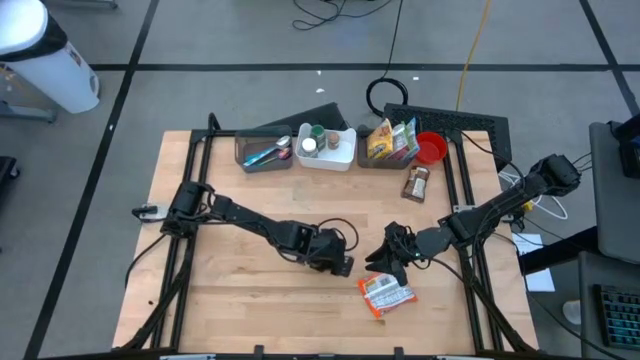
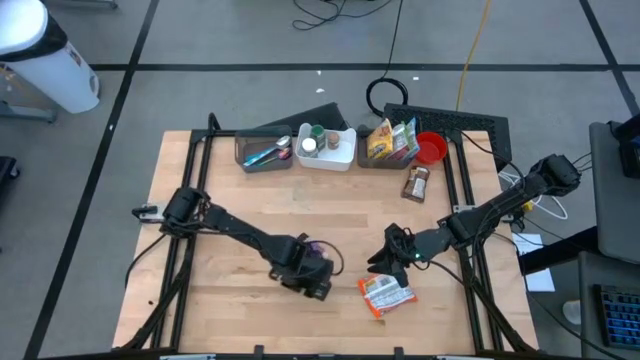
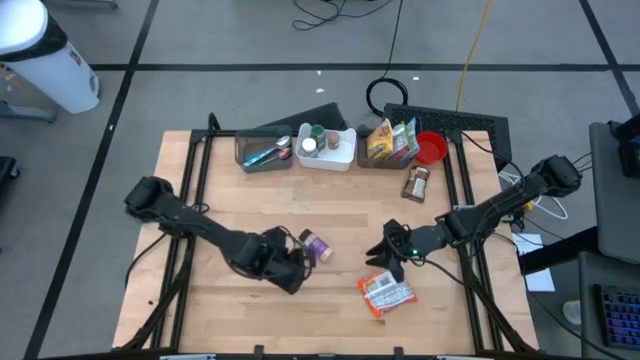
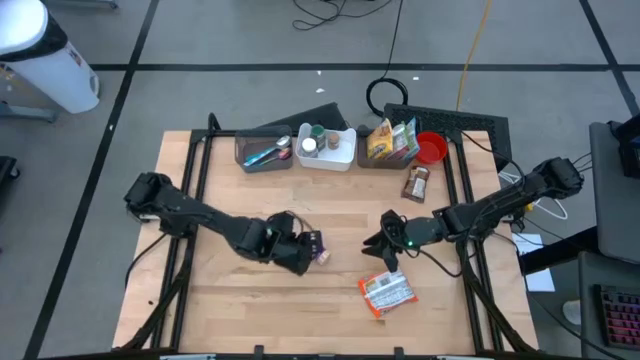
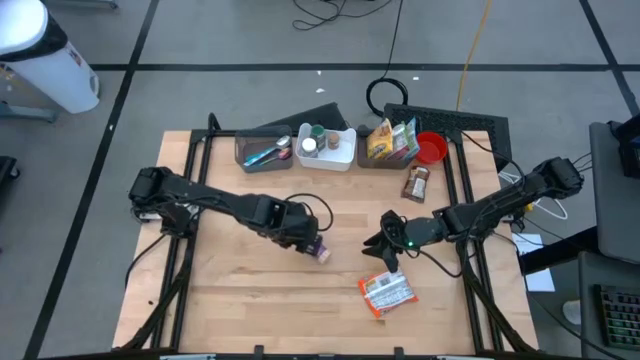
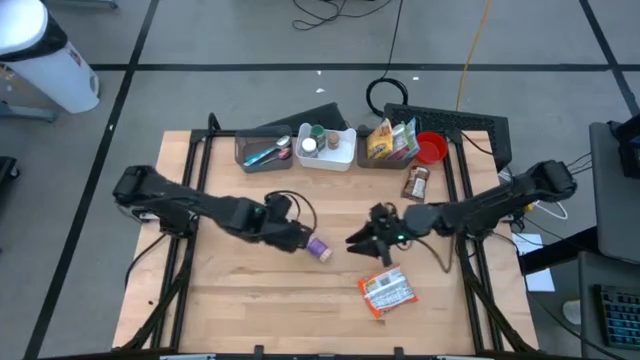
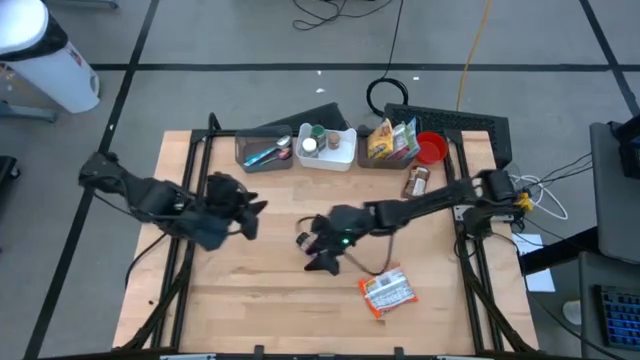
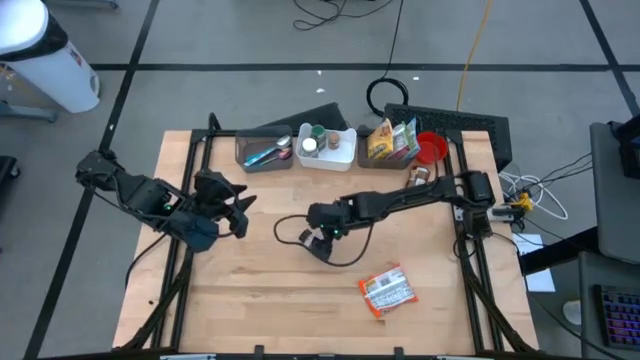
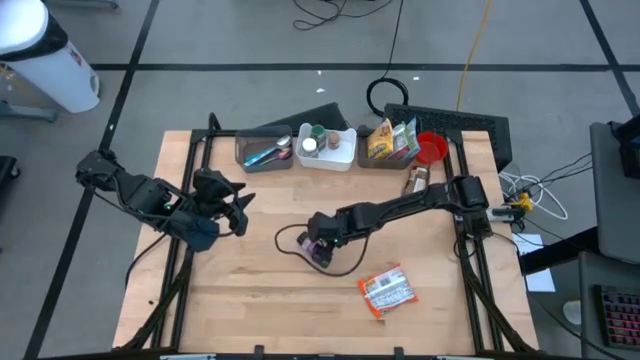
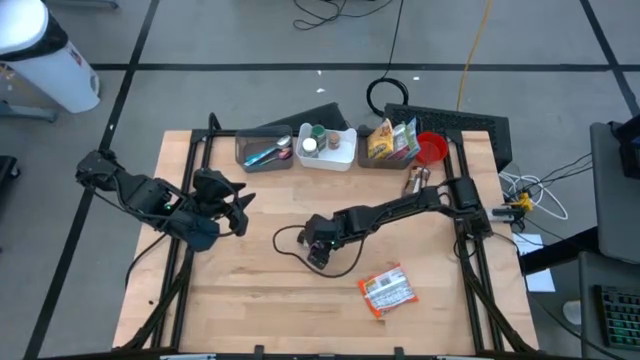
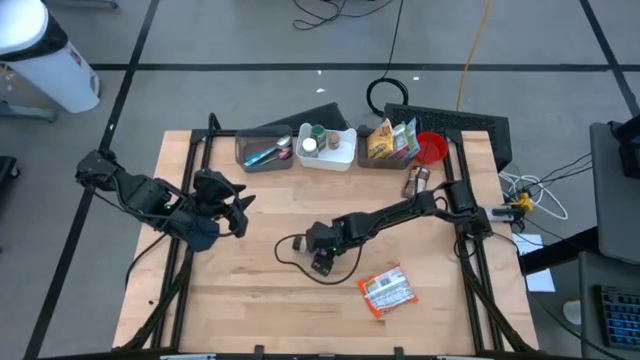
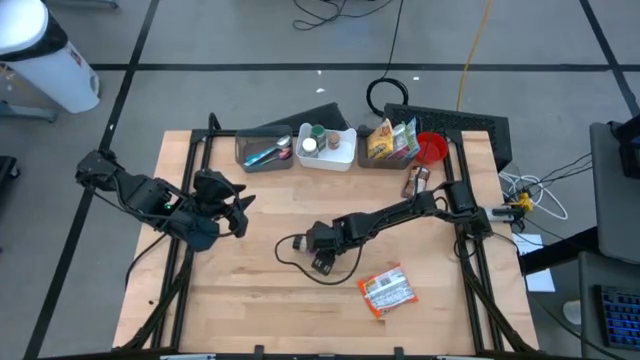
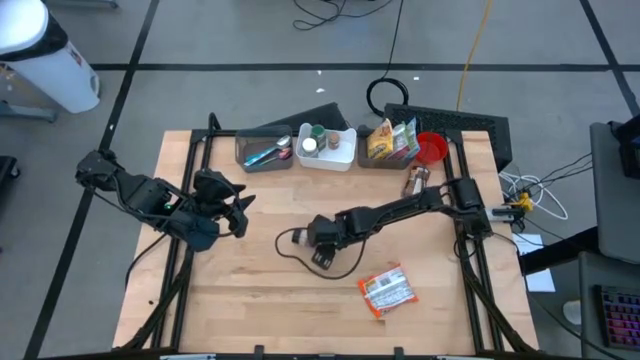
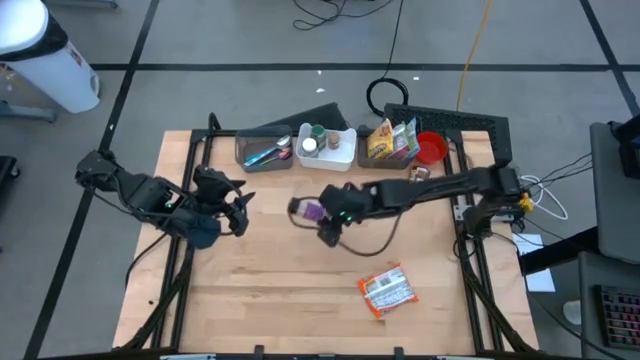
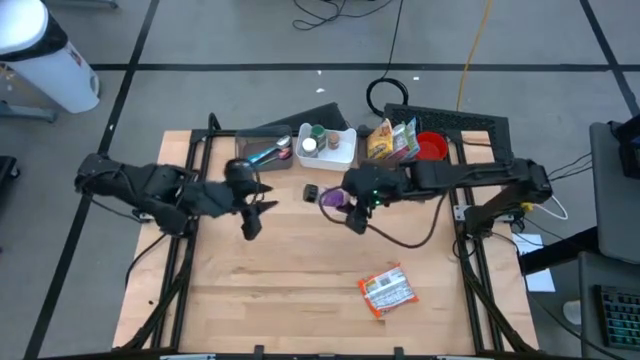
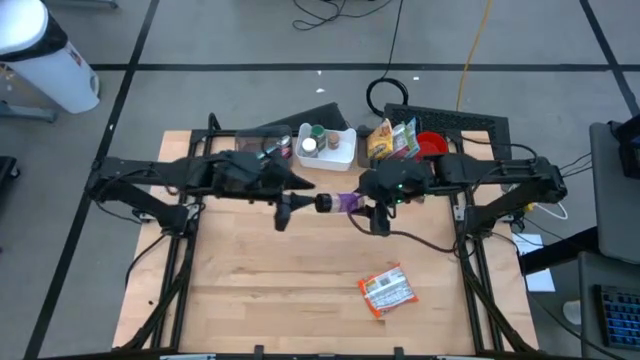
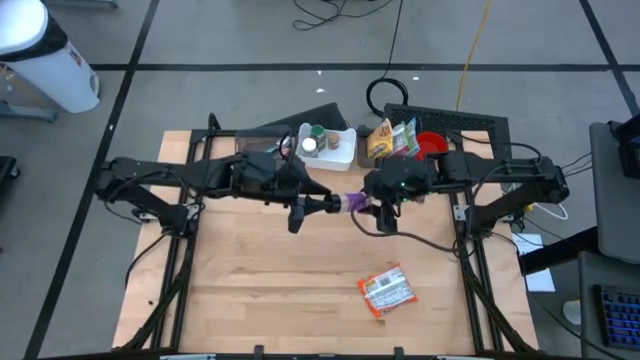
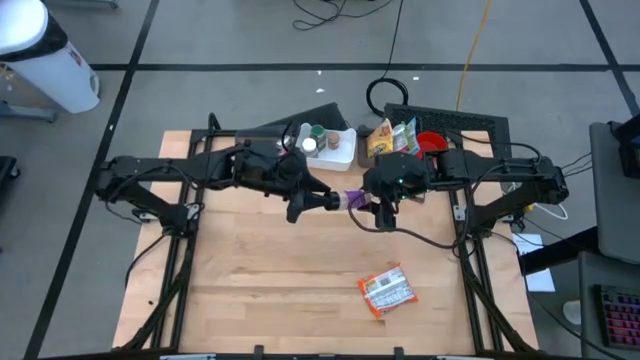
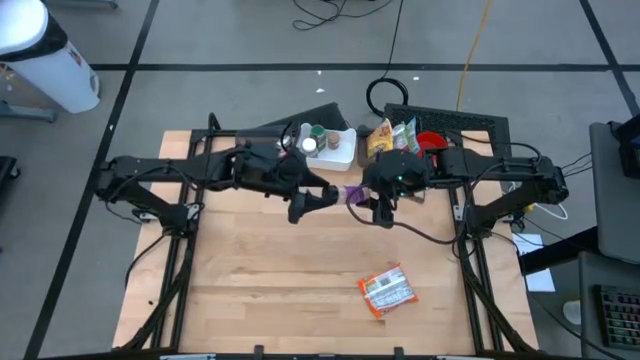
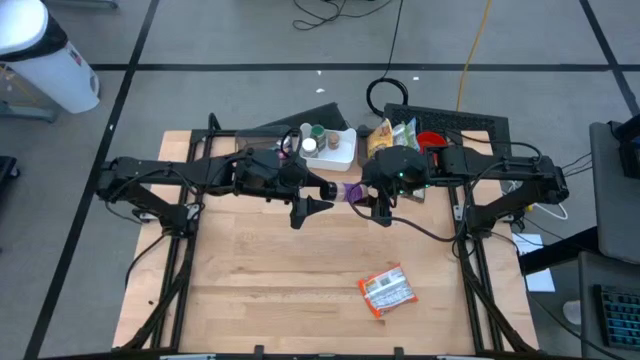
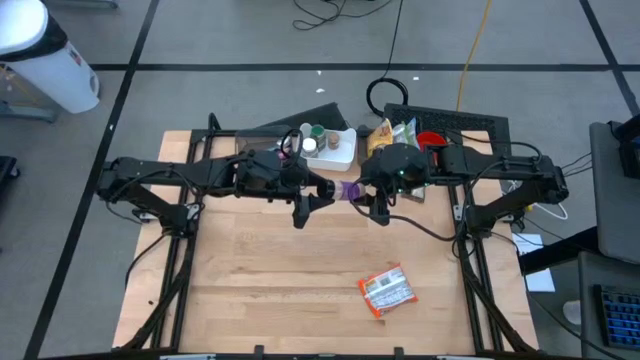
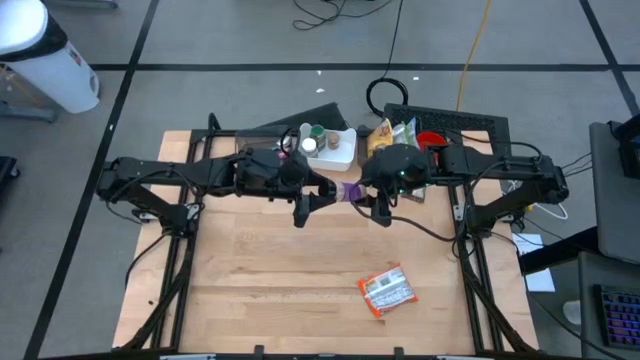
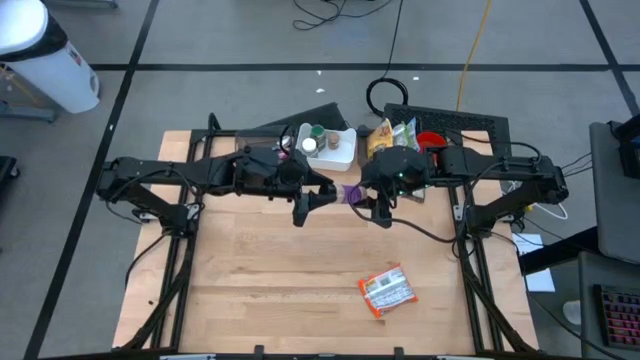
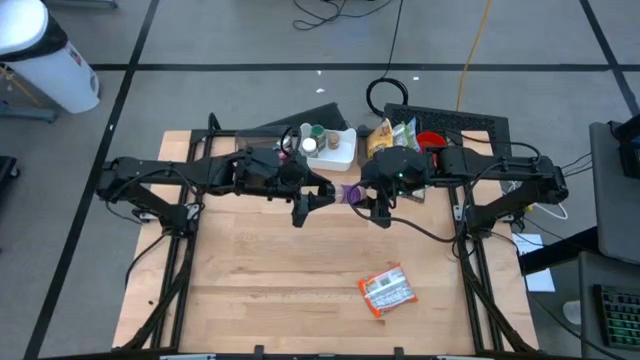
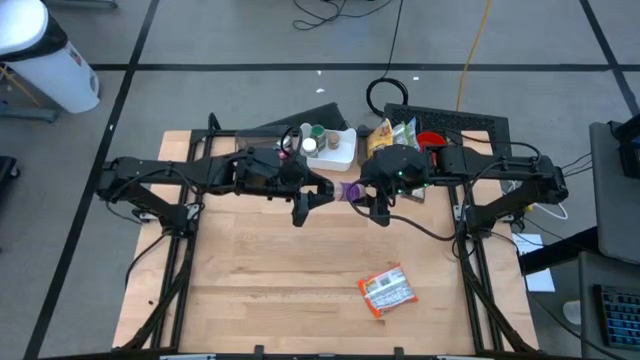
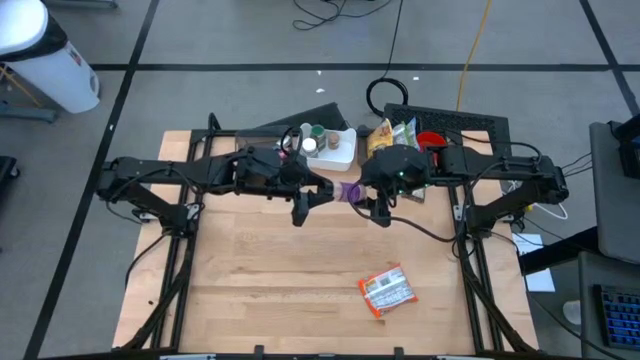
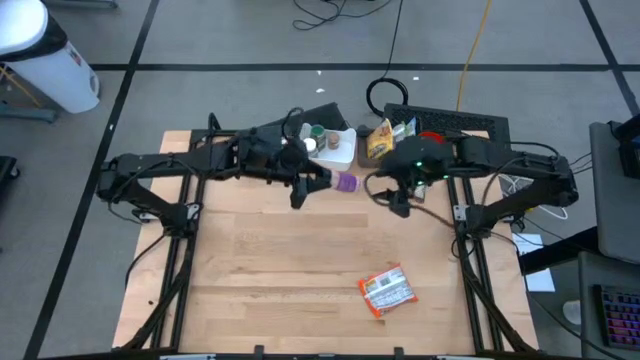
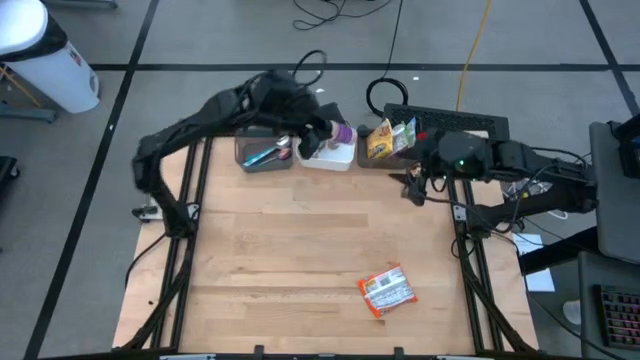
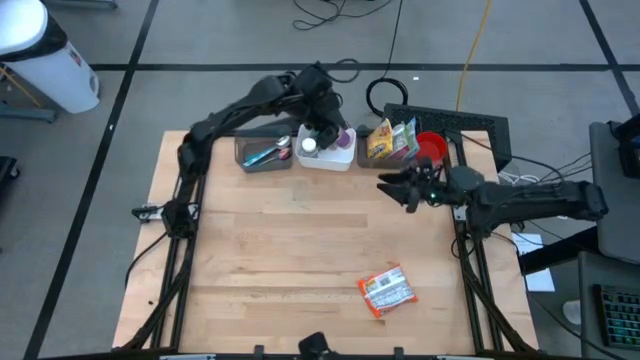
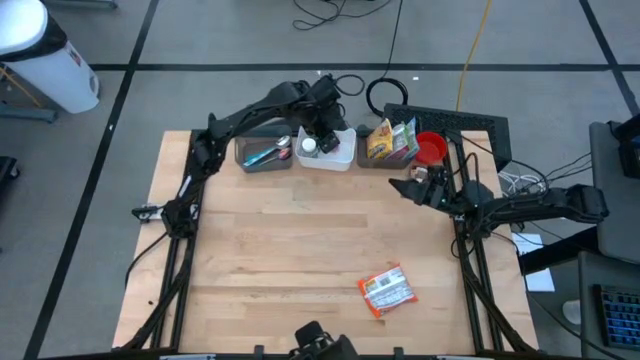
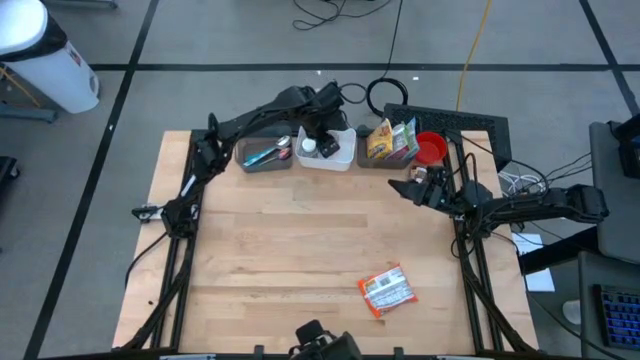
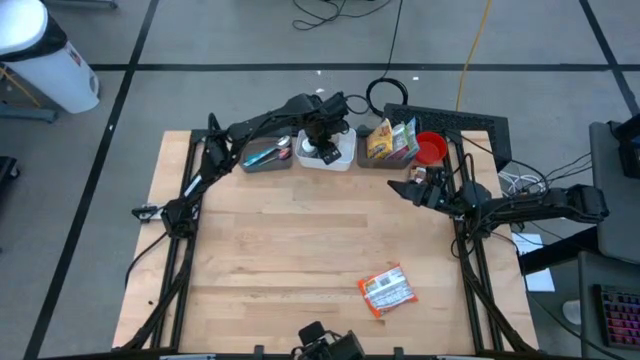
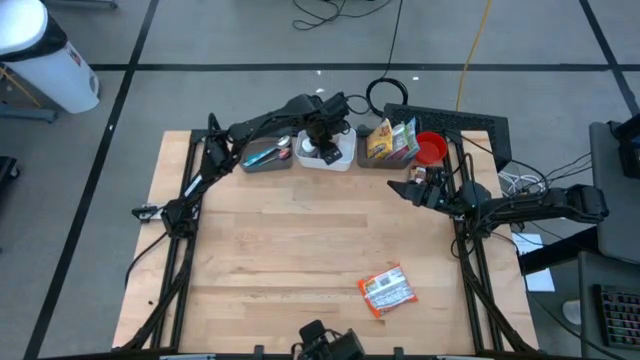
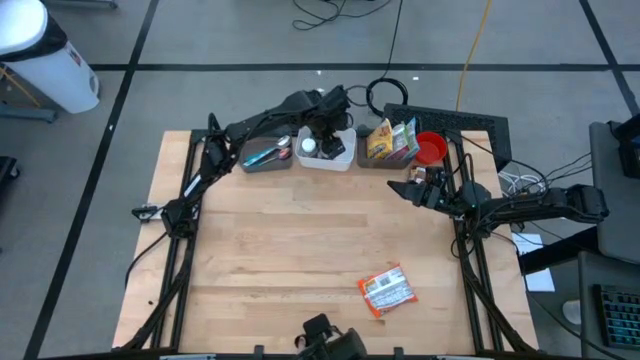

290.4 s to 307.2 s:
Task: Pick & Place Food Item
Put the black seasoning bottle into the white bin

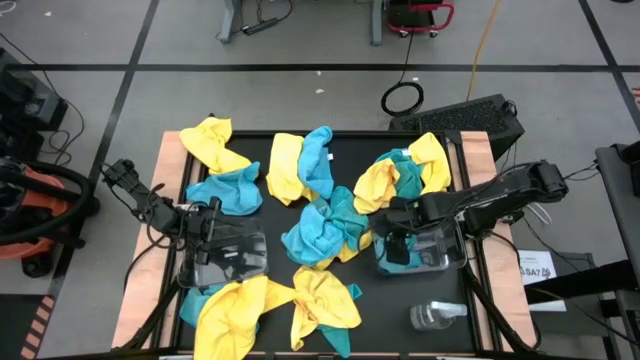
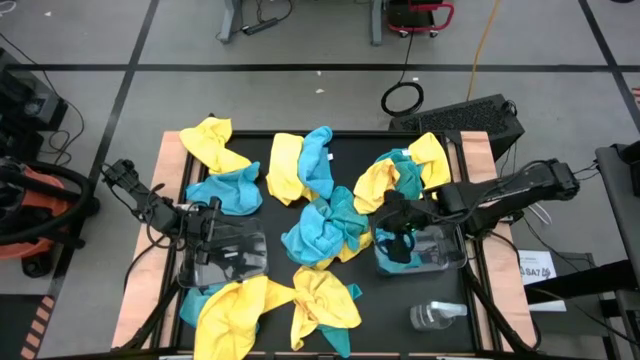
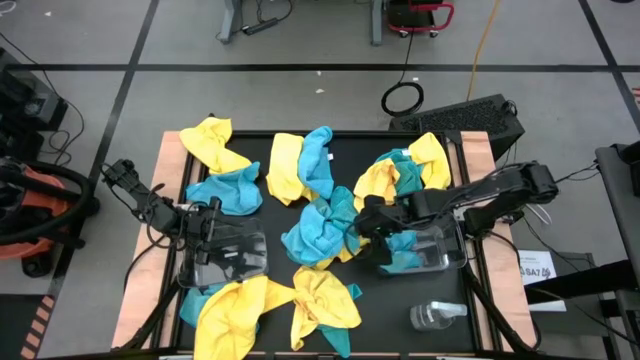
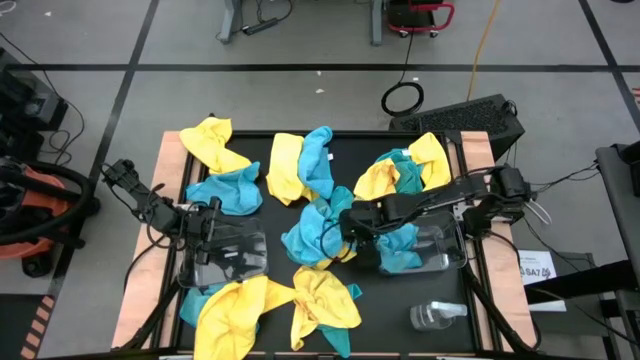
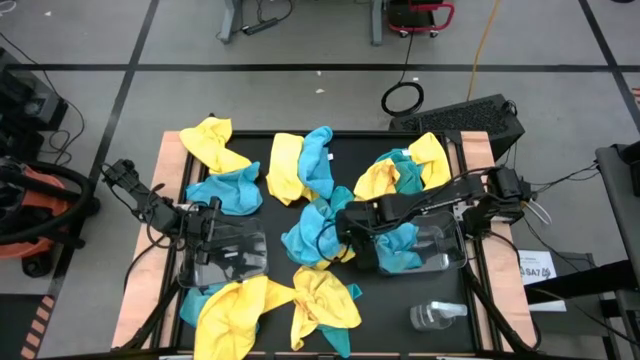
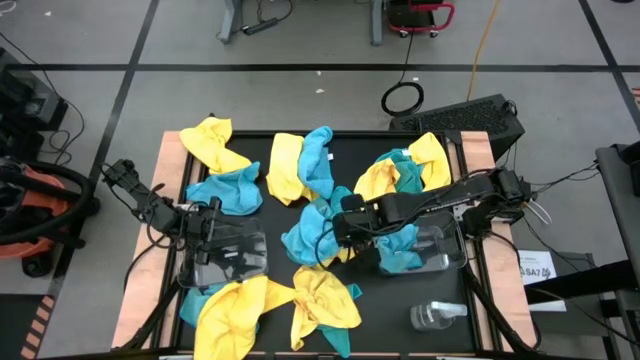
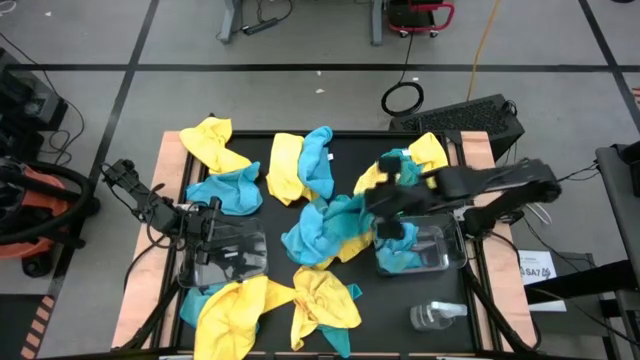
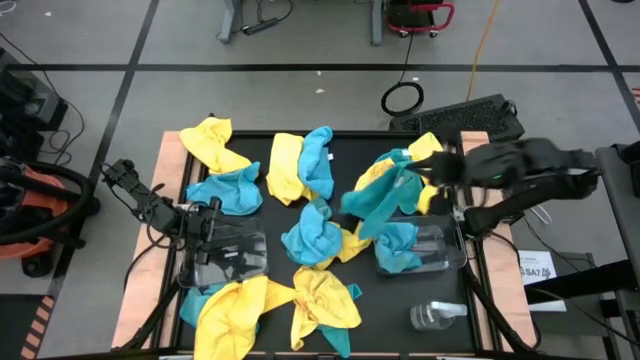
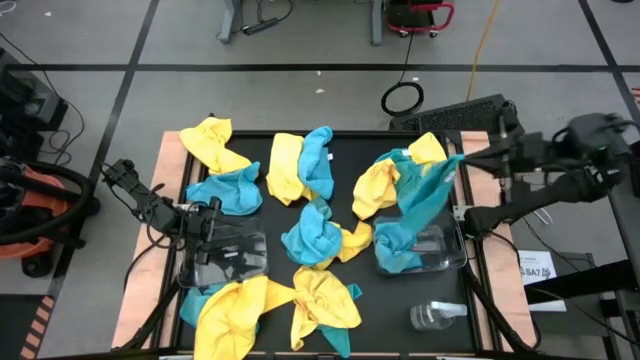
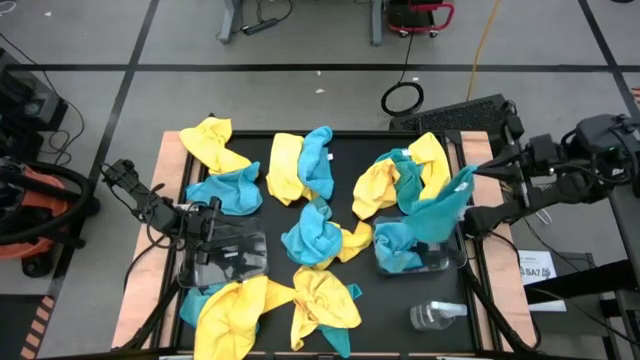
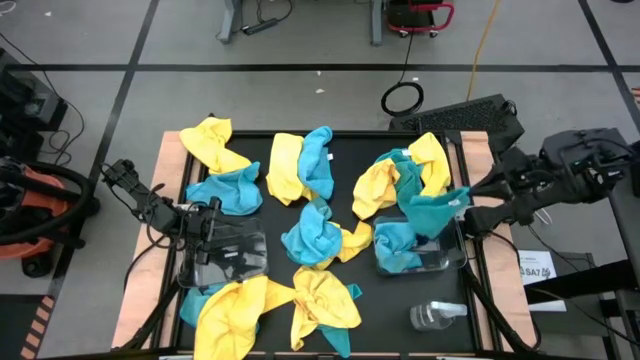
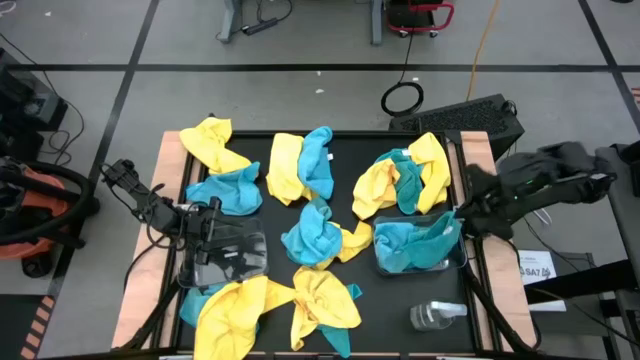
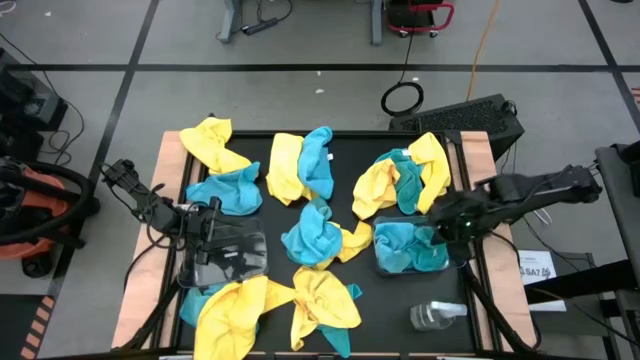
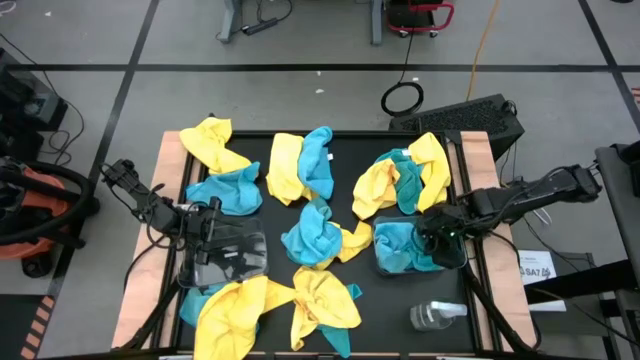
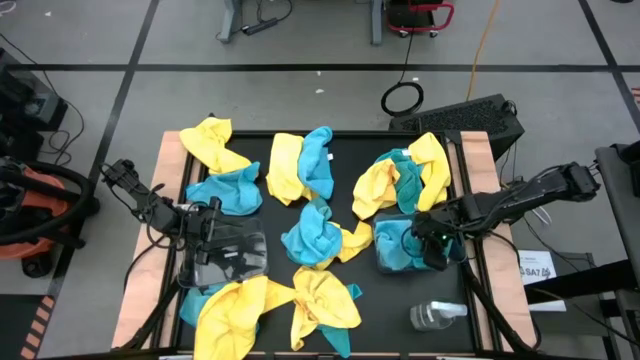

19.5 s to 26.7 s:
Task: Sort microfiber towel by color & place in baskets
Put the blue microfiber towel into the right transparent bin
